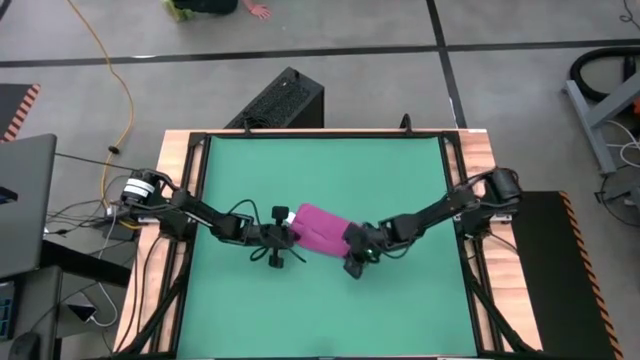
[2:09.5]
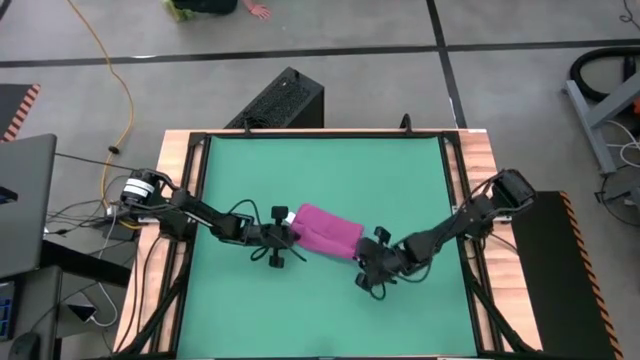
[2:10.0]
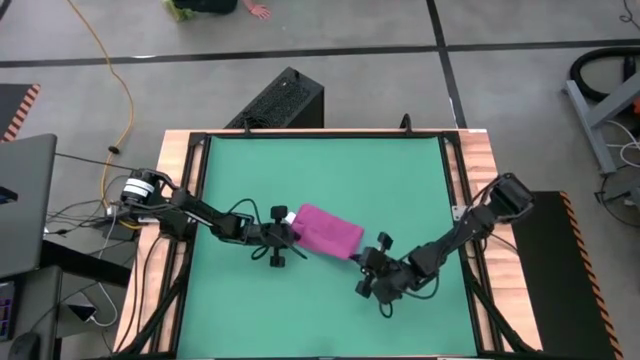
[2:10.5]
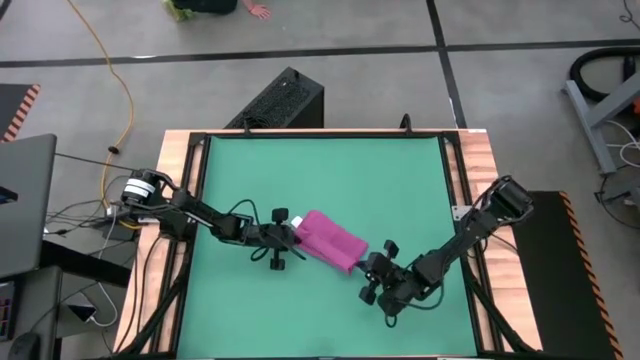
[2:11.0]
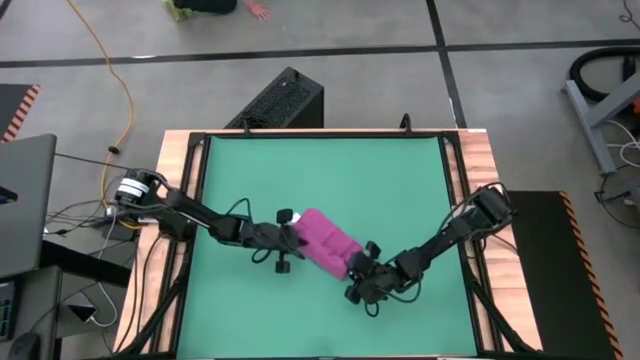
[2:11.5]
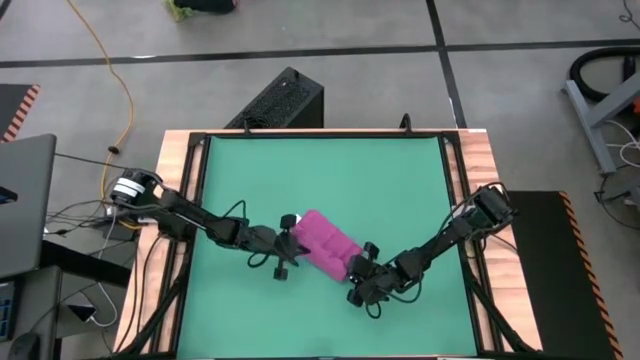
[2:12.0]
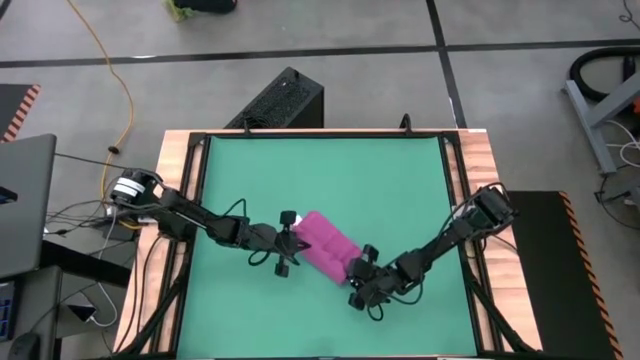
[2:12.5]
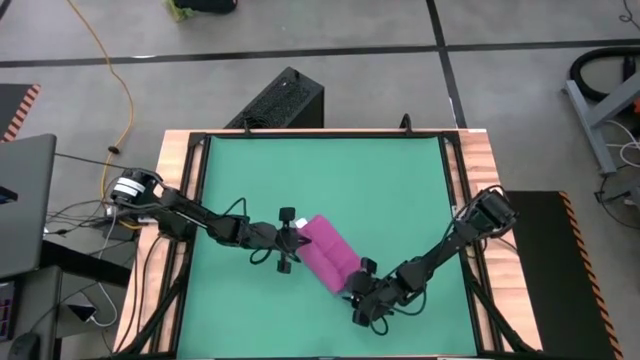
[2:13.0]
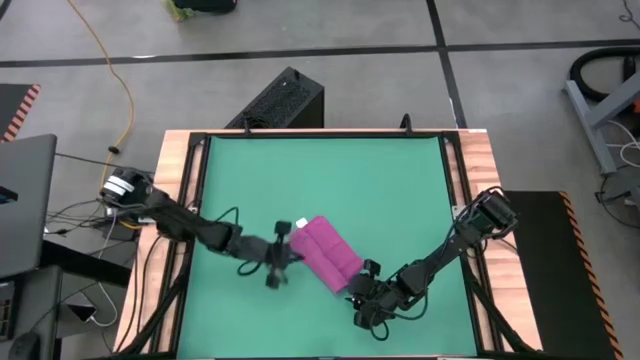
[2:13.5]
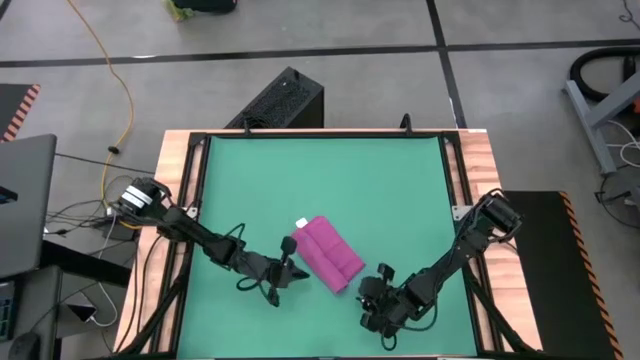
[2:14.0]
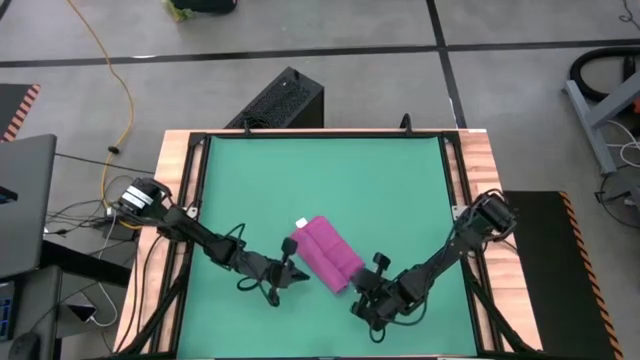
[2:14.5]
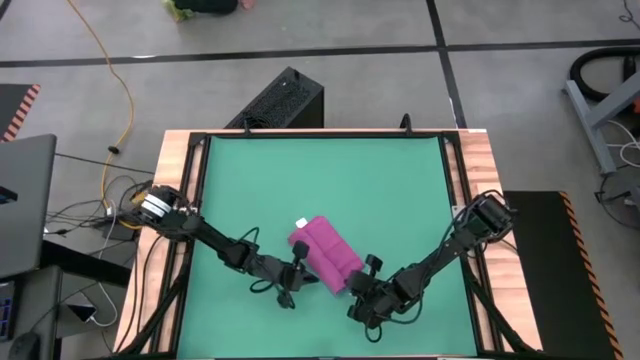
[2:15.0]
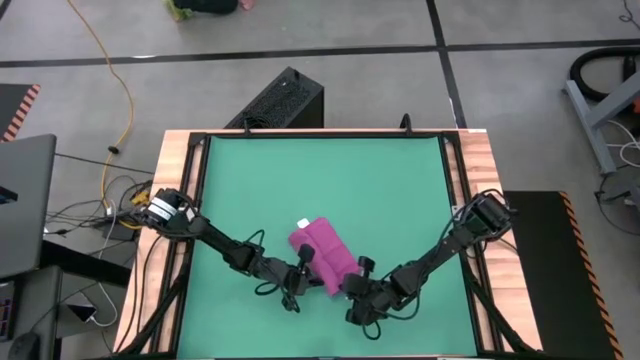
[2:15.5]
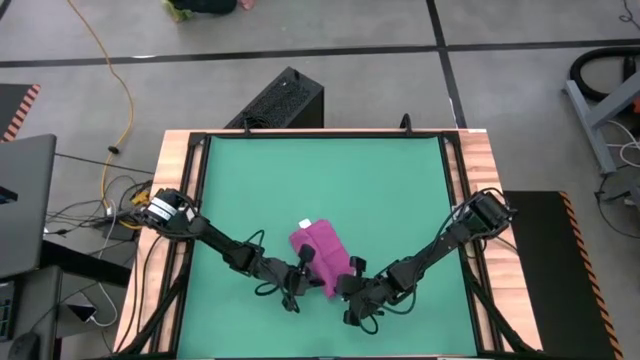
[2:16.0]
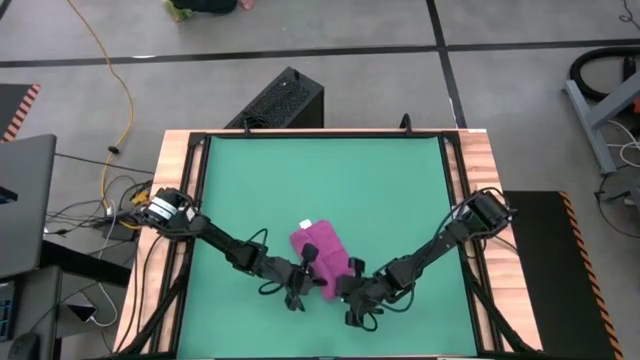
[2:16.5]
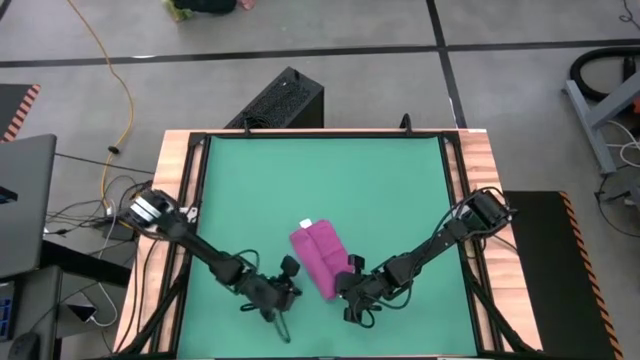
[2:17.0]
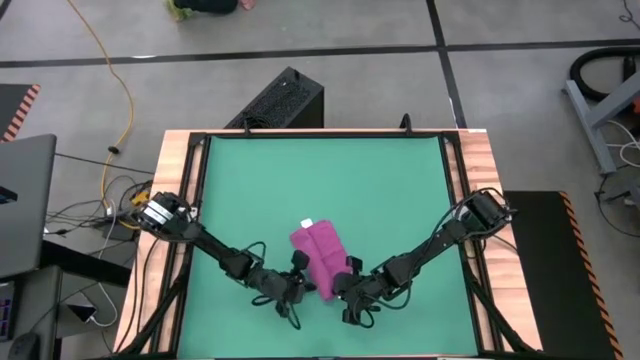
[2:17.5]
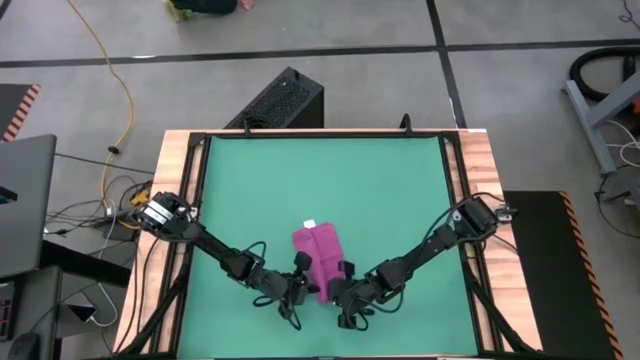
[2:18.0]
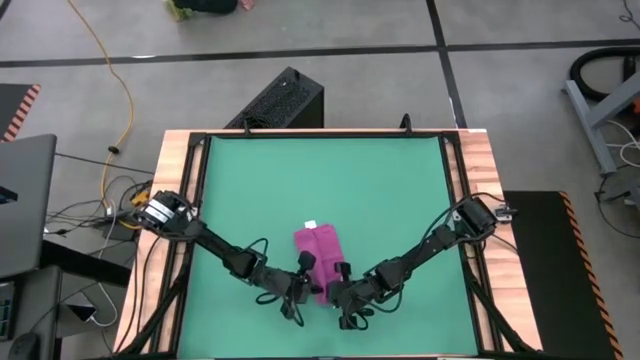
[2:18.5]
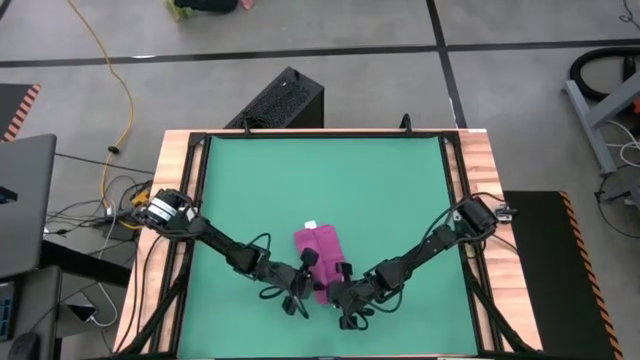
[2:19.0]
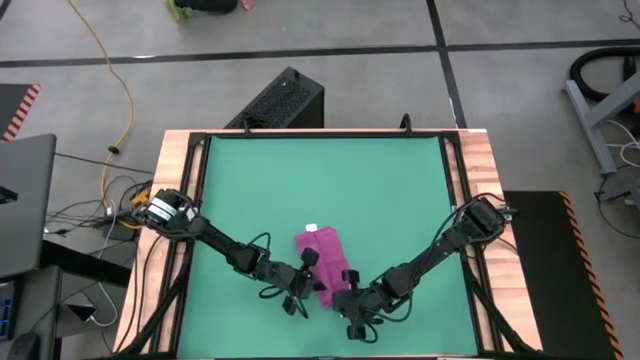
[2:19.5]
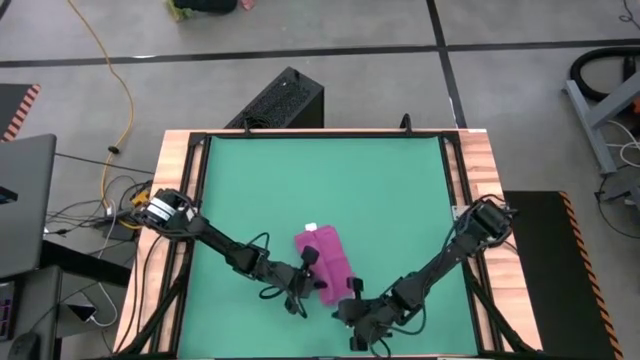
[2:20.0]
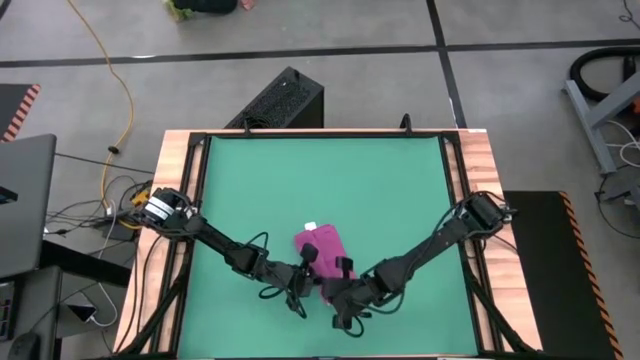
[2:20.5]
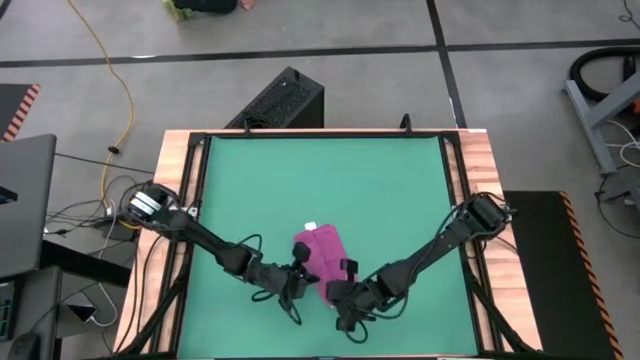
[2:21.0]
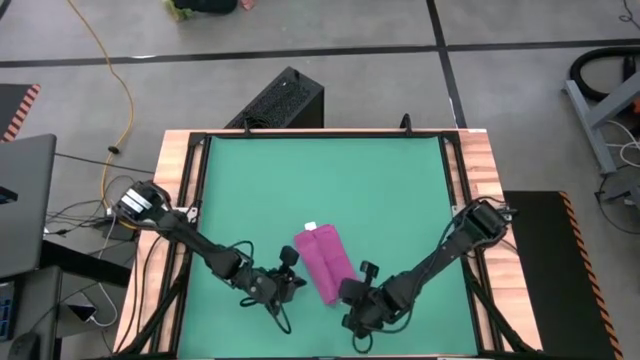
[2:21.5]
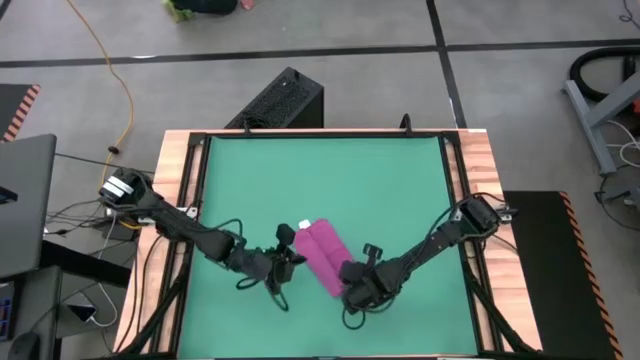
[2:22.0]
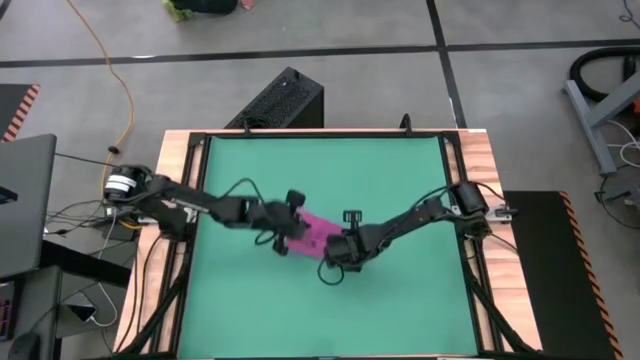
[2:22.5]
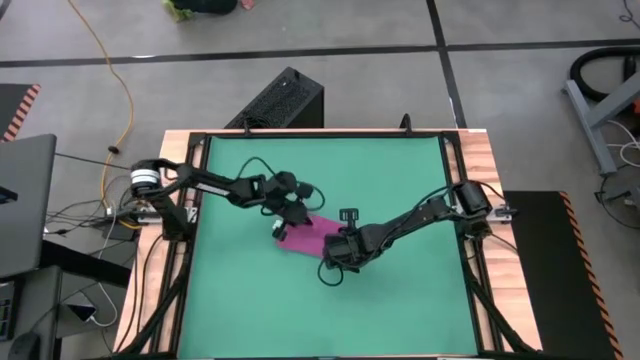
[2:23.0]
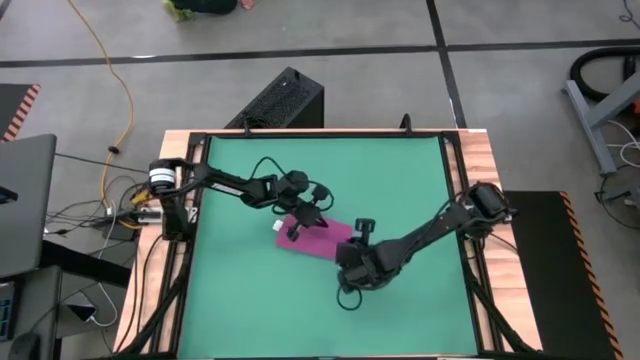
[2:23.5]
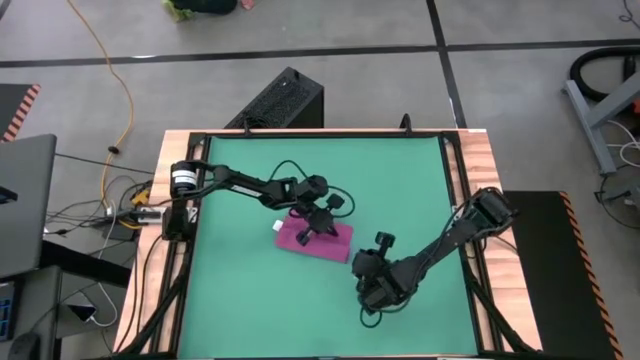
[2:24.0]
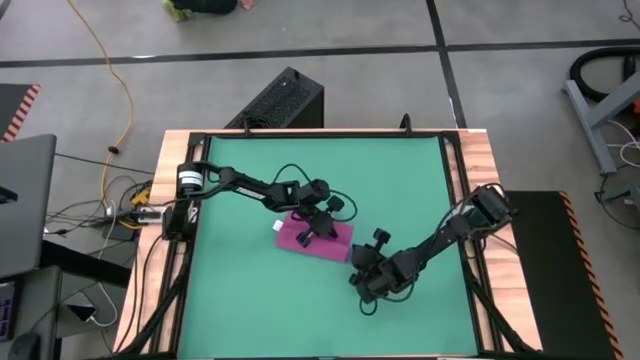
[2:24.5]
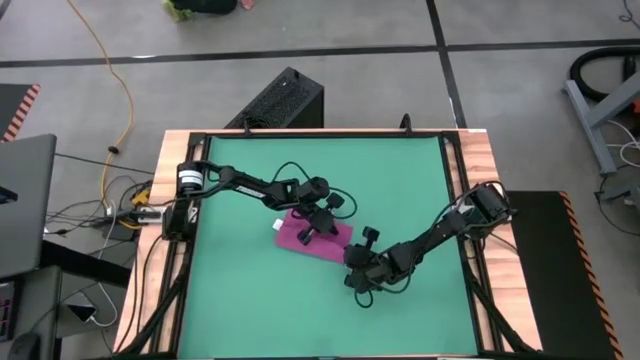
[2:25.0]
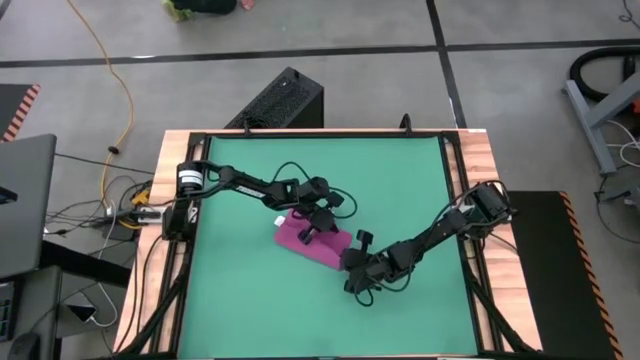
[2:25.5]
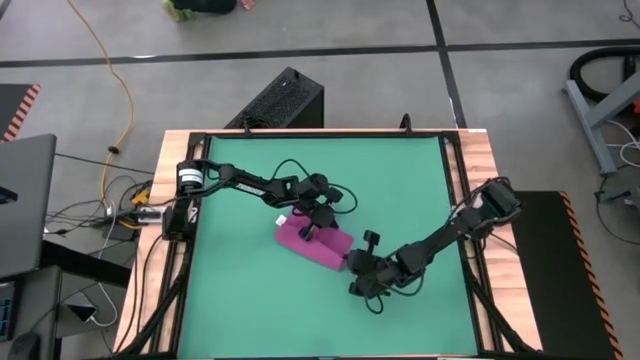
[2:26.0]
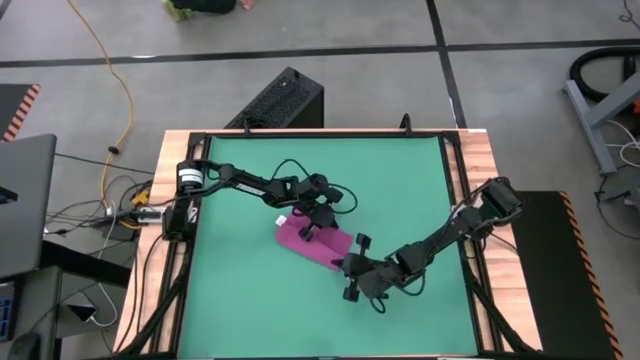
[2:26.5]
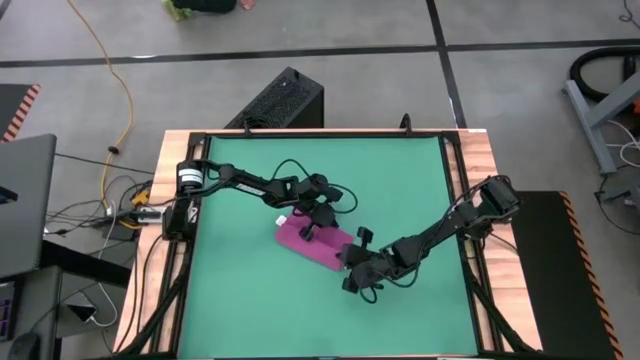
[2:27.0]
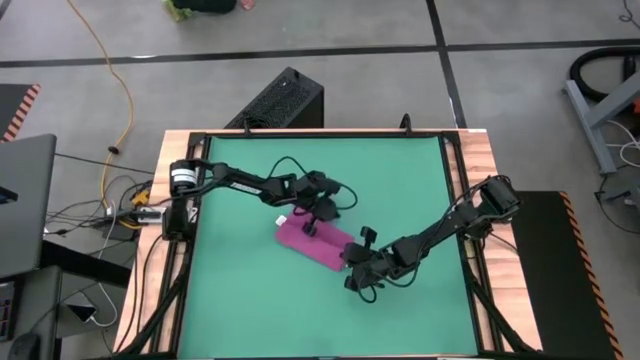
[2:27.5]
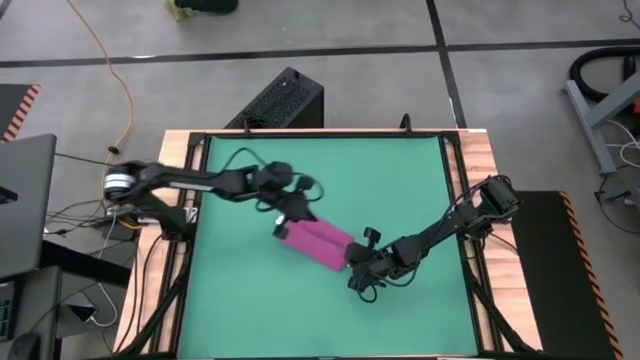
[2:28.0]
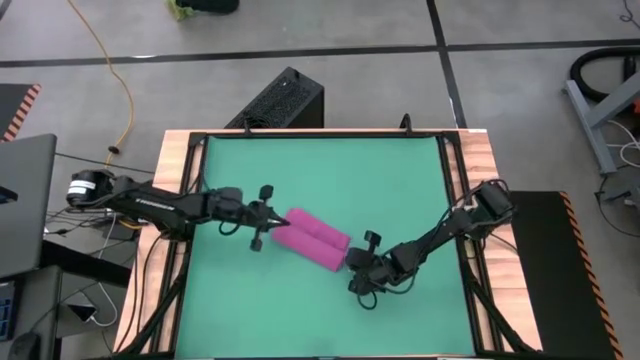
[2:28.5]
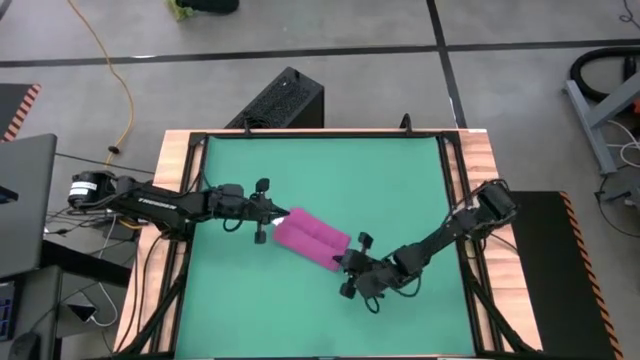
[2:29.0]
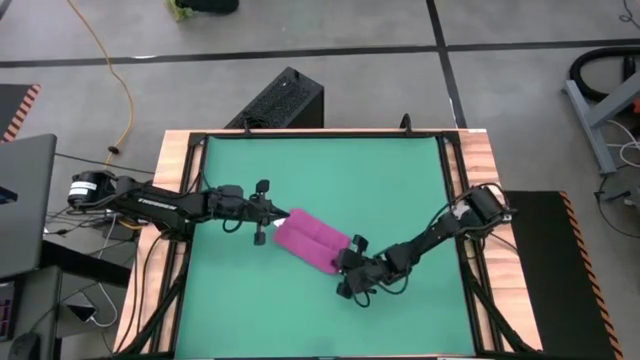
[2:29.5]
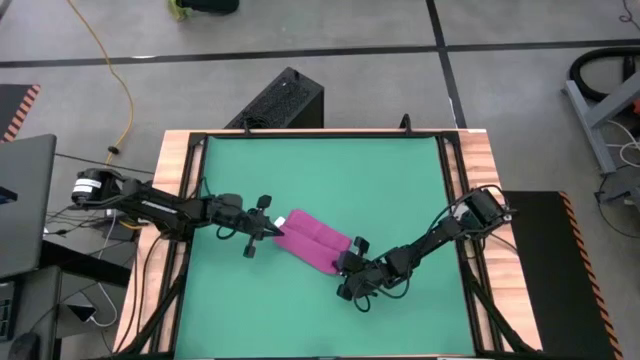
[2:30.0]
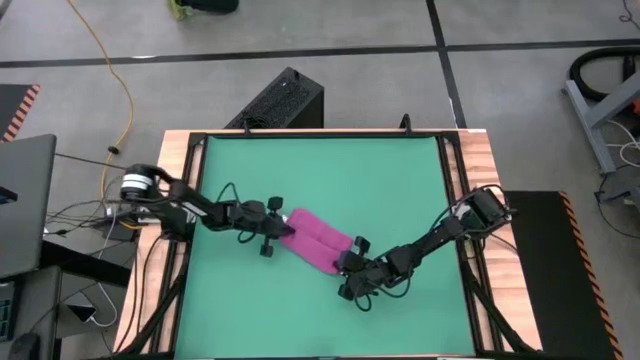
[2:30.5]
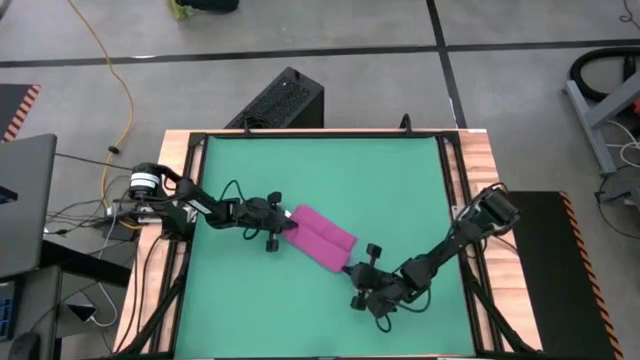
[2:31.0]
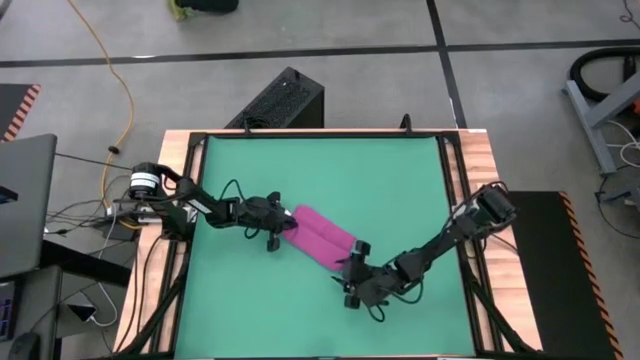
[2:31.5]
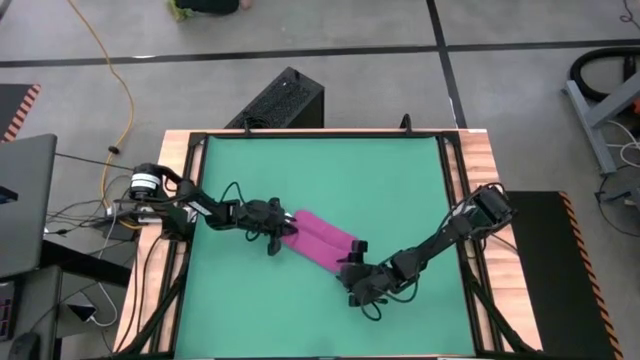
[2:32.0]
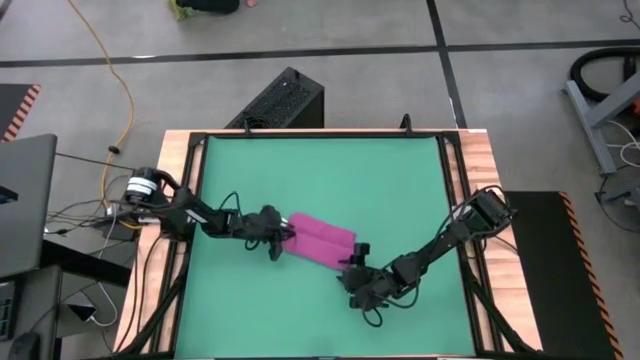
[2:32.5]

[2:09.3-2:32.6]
Task: Roll towel into tight, uniform cylinder
Roll the pink towel
